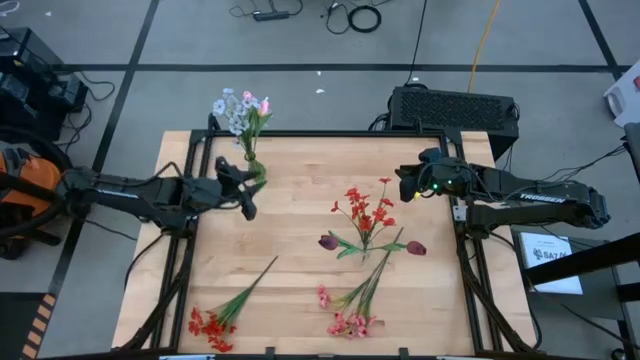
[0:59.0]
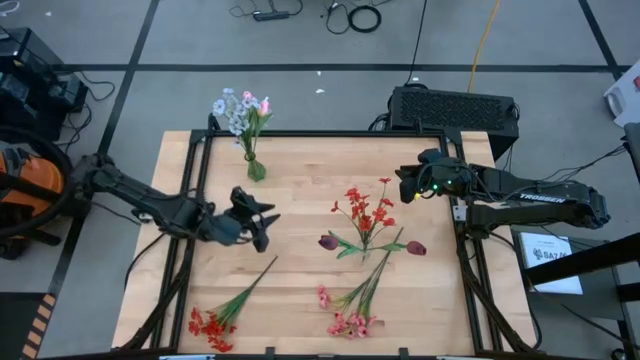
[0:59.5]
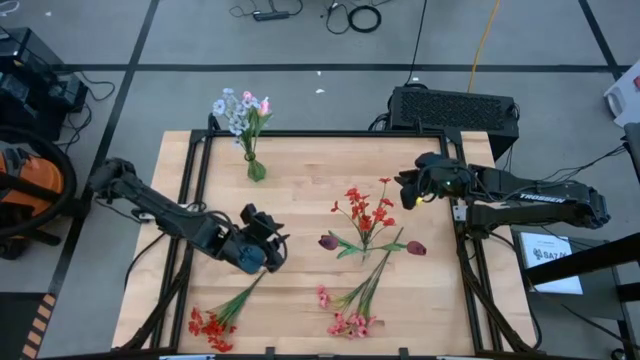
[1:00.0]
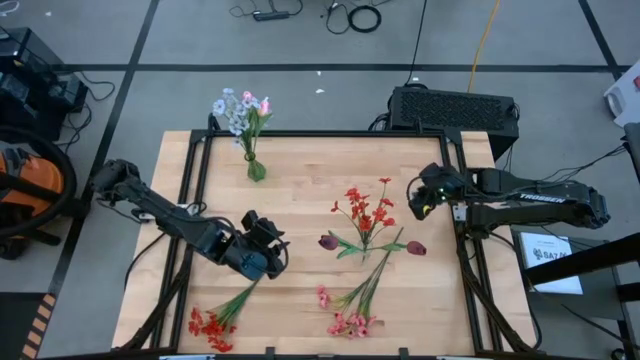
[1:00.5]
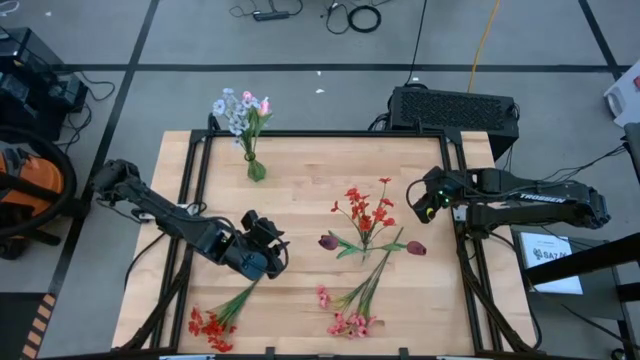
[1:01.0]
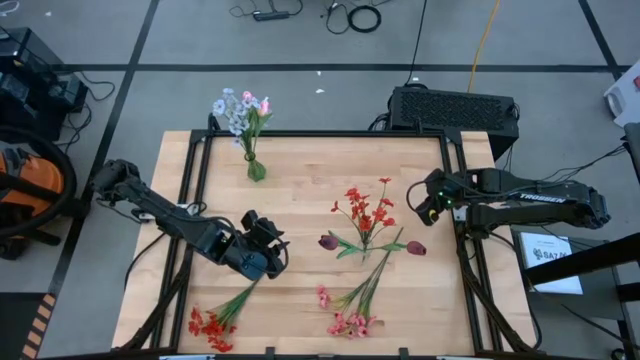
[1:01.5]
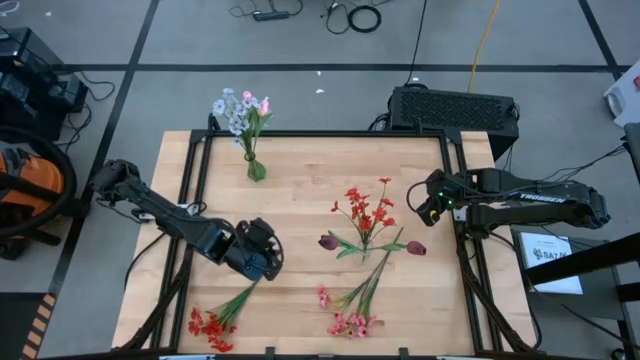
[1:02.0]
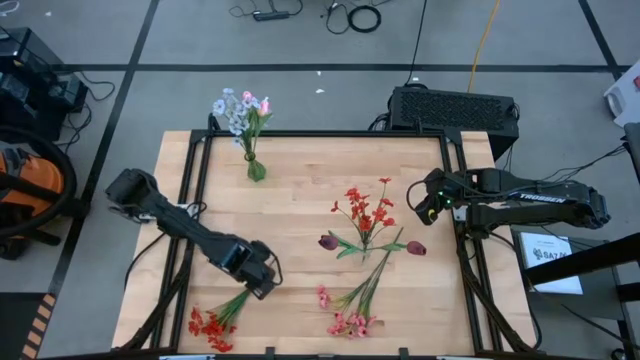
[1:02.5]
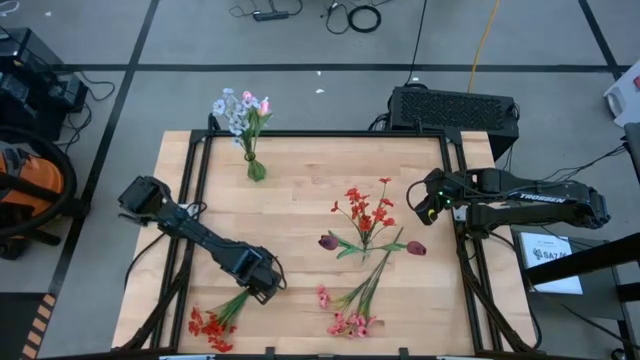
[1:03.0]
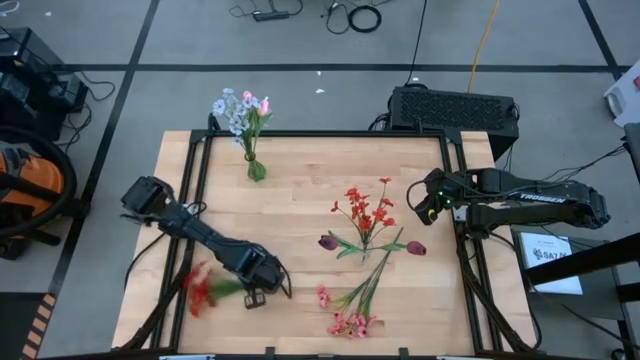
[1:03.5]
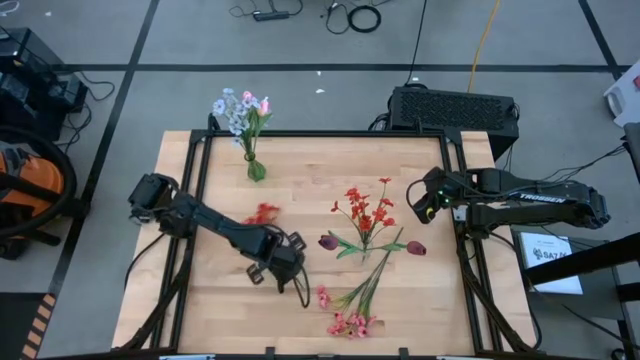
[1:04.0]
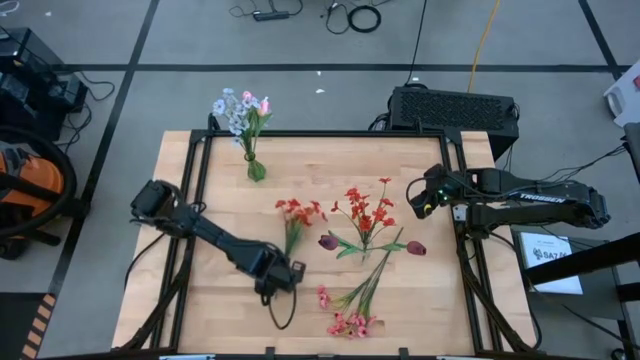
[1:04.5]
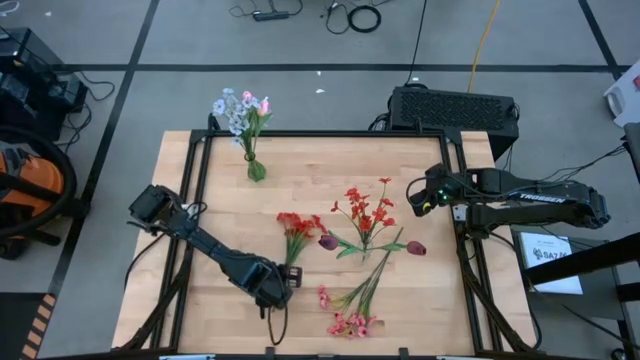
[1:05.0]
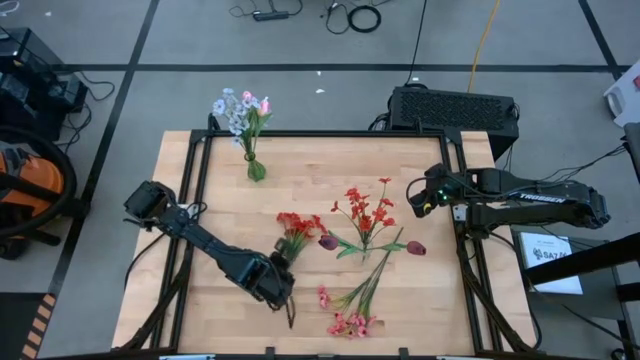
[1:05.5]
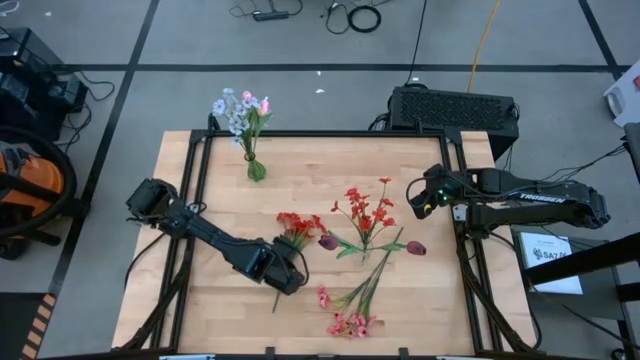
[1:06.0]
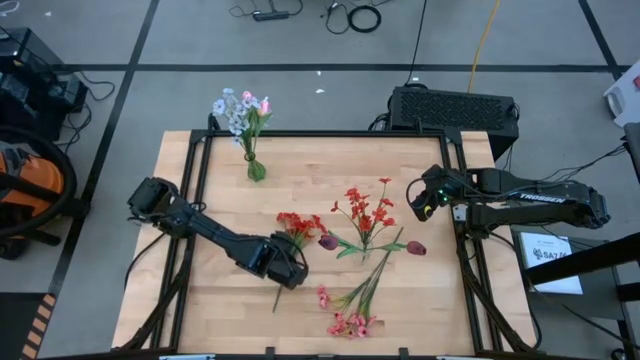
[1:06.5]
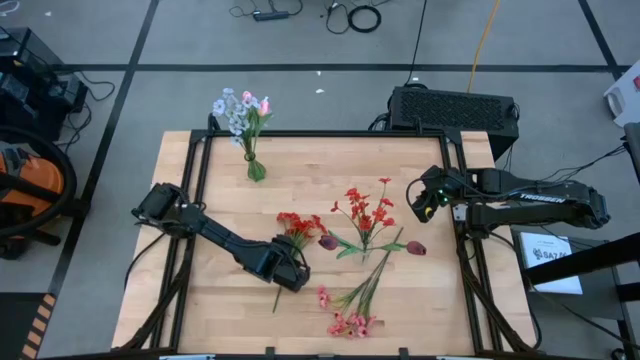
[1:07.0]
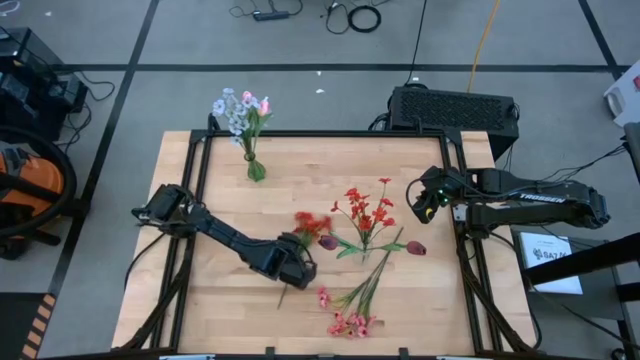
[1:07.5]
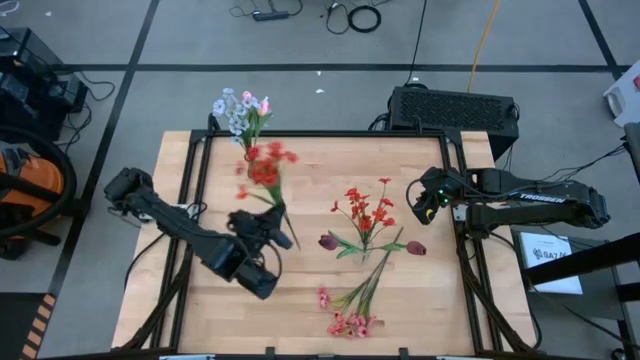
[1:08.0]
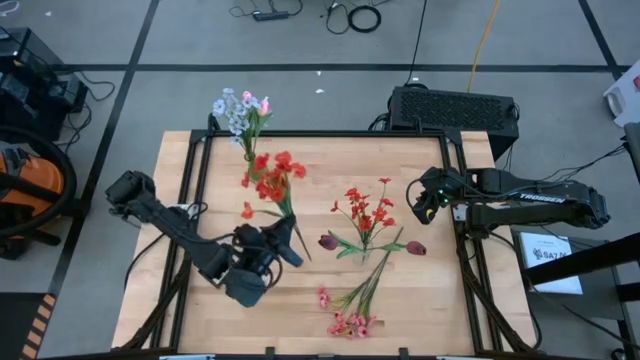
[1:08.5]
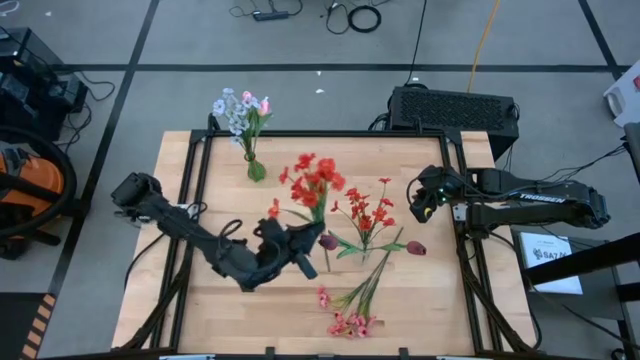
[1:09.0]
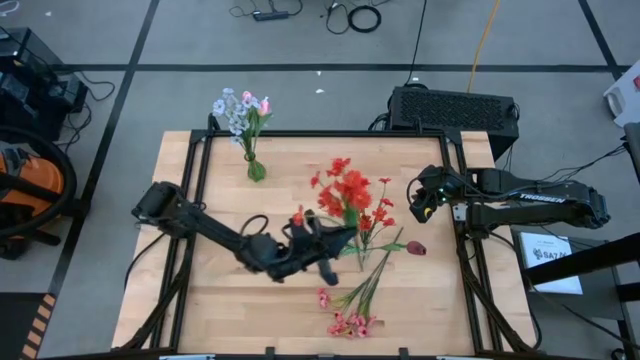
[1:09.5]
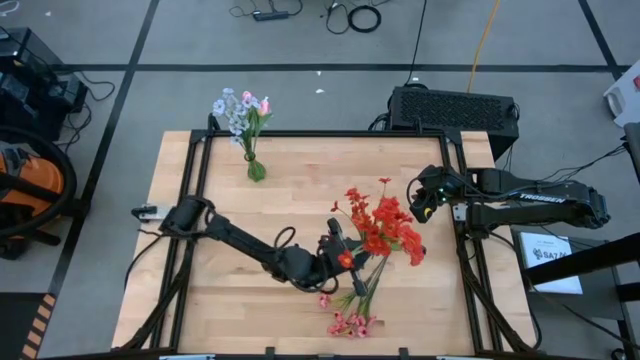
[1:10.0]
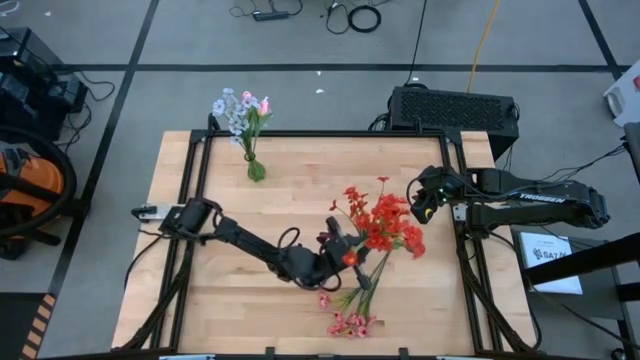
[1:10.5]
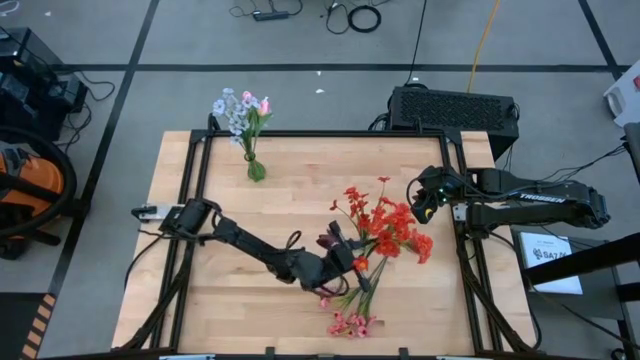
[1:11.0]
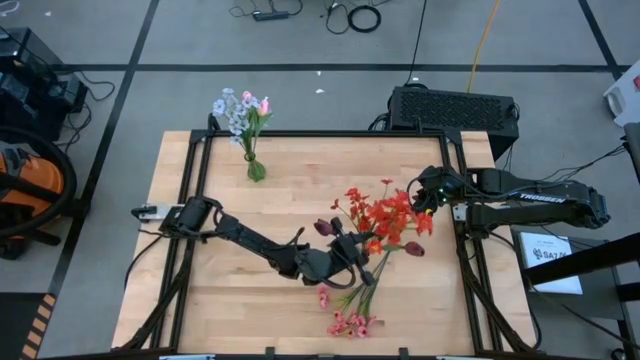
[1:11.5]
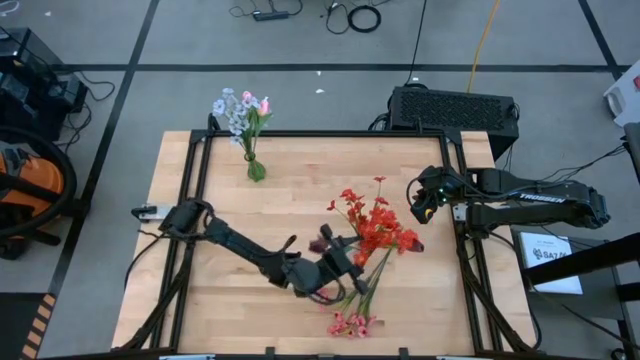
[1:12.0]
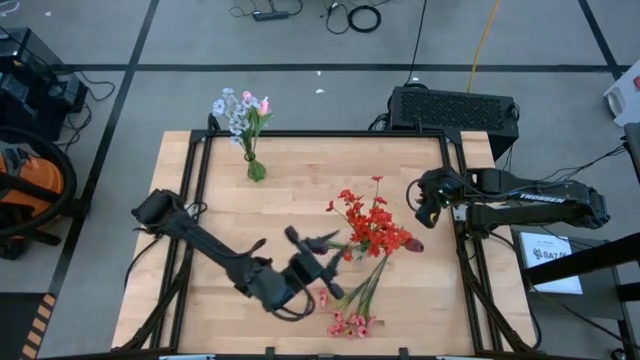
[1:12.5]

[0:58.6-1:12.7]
Task: Sort flowers into vase by color
Put the orange flower into the transparent vase

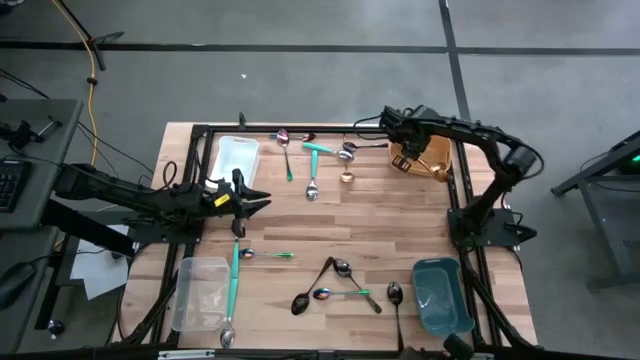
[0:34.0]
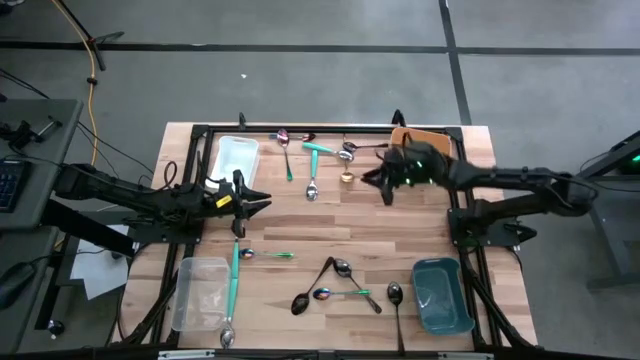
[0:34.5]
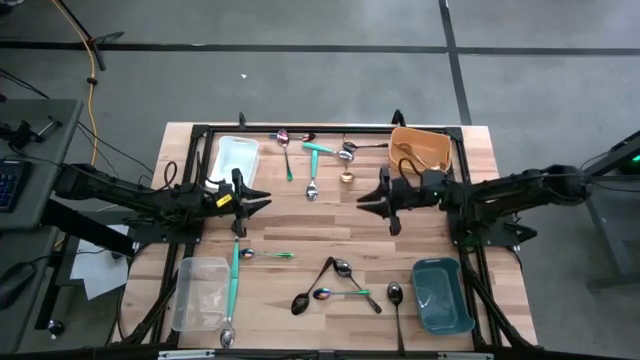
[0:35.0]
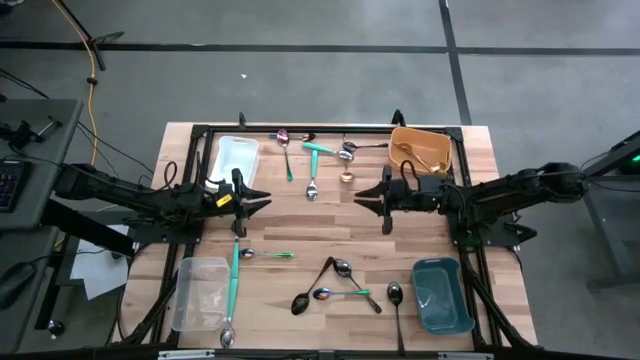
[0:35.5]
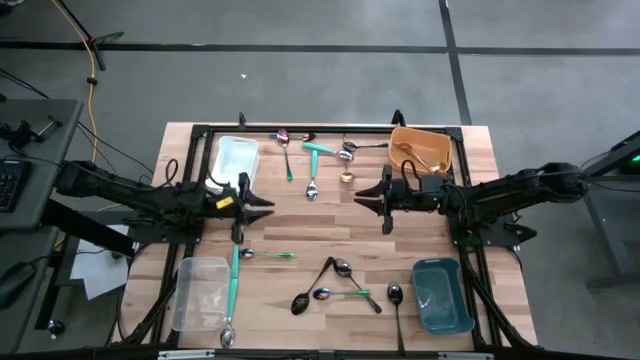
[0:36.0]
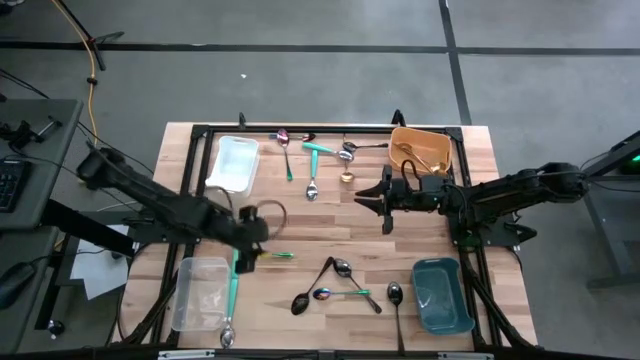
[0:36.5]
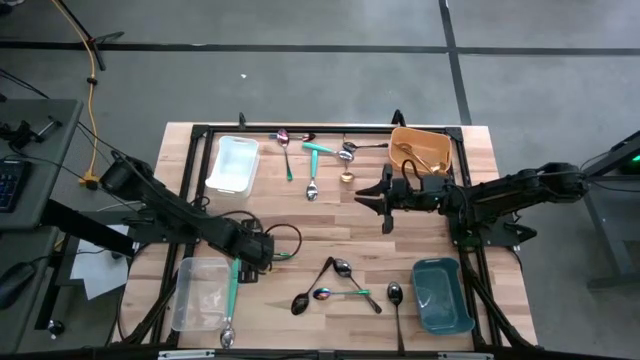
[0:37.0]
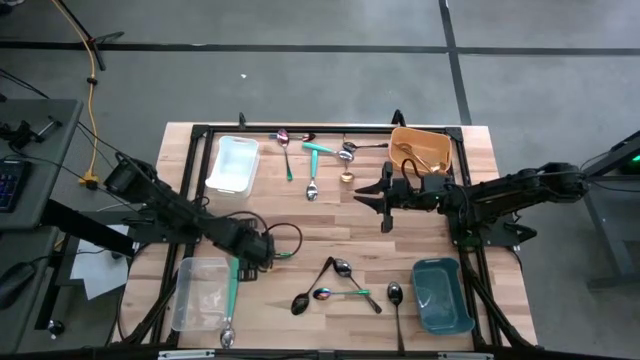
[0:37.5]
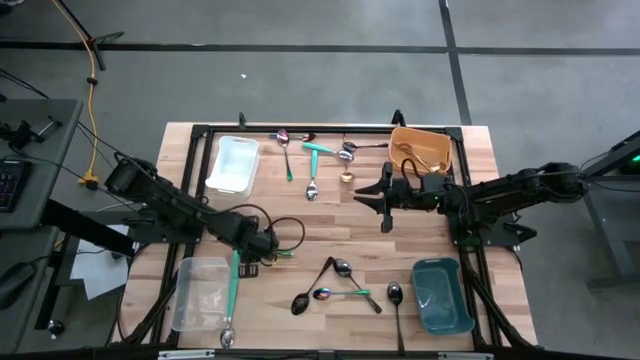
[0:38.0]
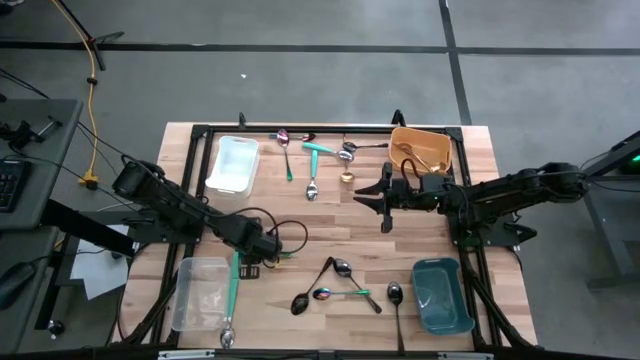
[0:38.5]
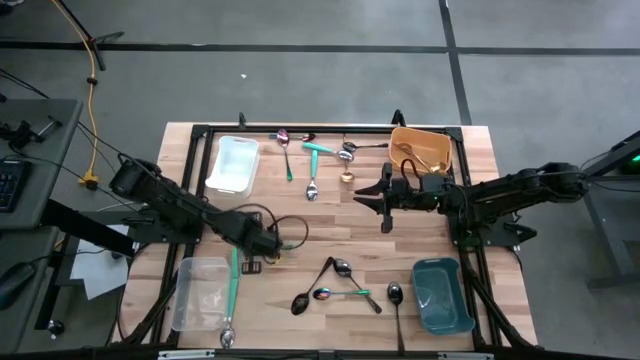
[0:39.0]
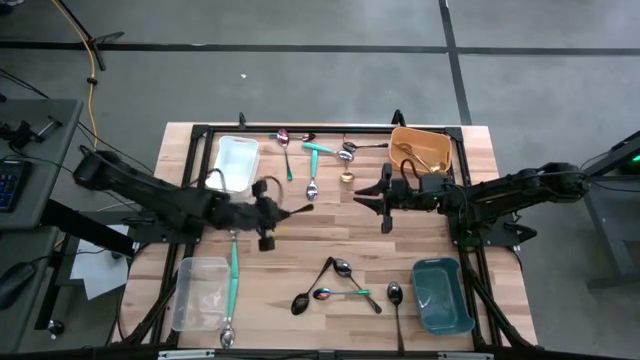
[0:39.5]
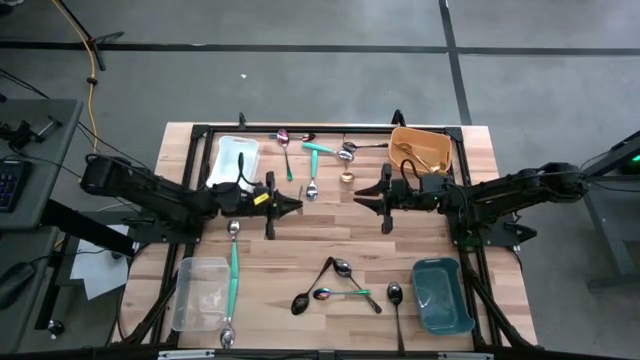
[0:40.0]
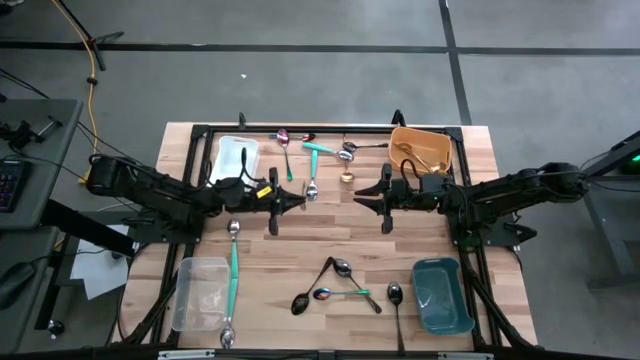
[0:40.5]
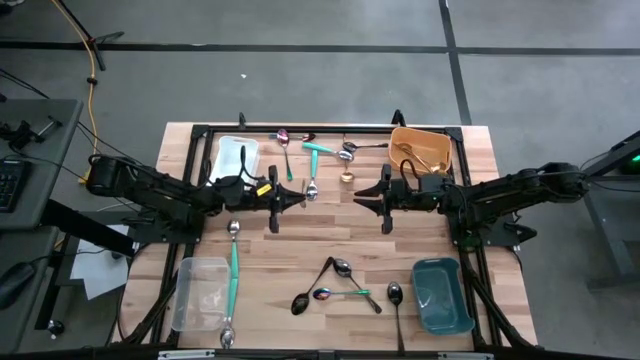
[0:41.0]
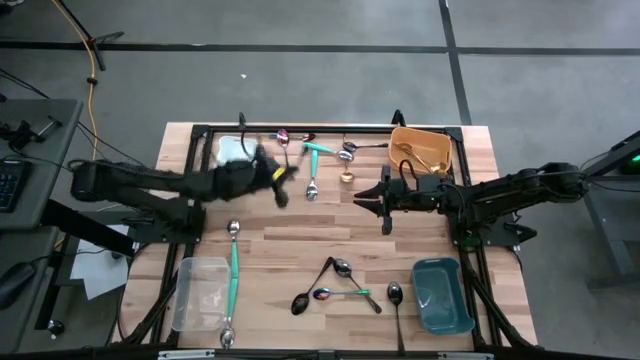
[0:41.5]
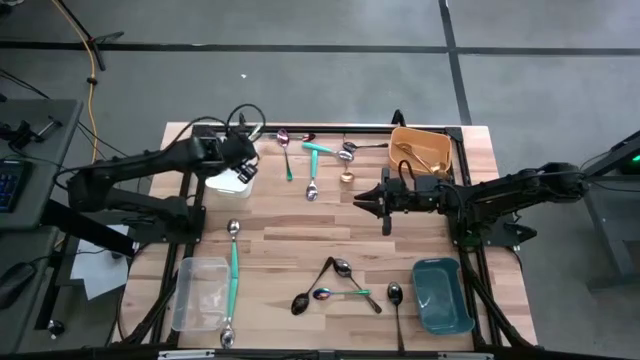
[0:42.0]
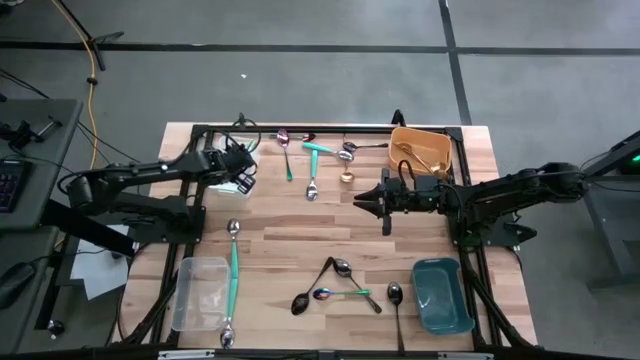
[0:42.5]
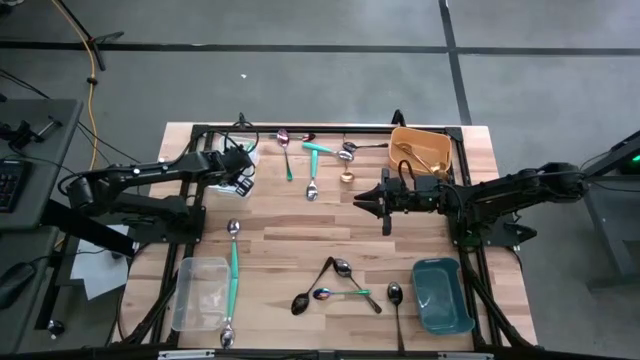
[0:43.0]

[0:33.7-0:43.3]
Task: Sort silverware by color (type)
Put the violet spoon into the white bin
